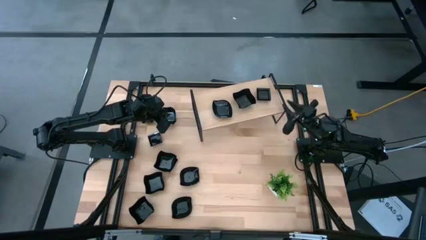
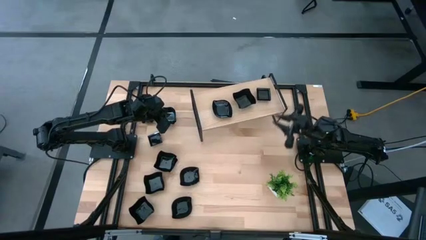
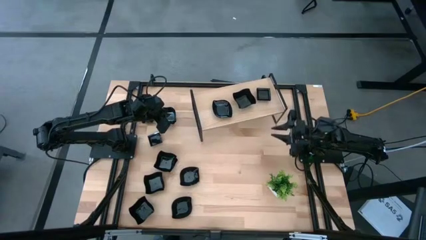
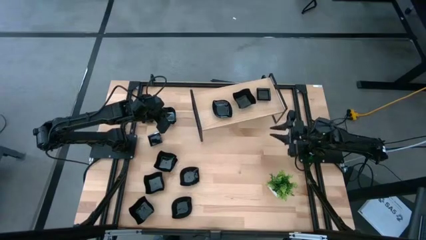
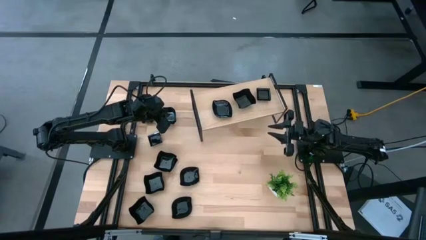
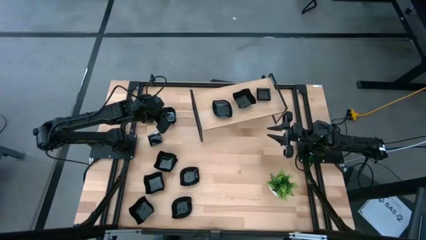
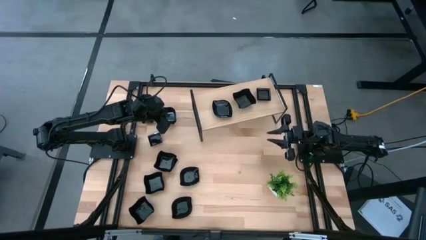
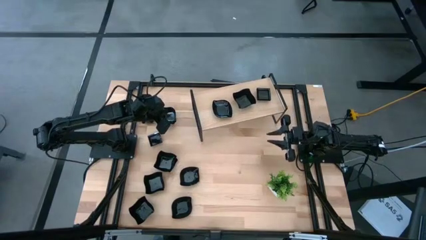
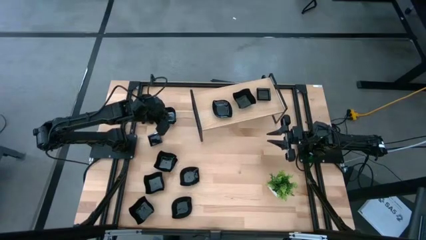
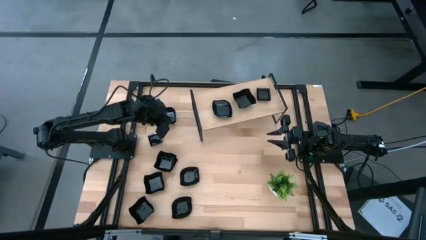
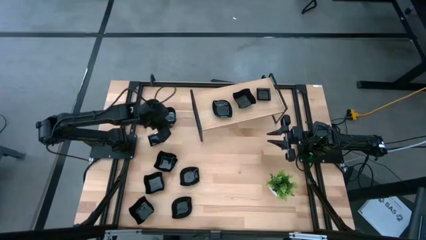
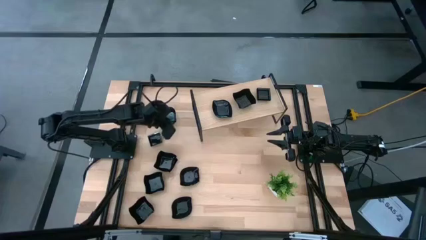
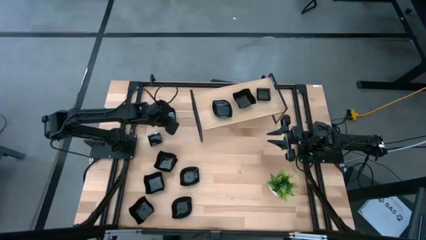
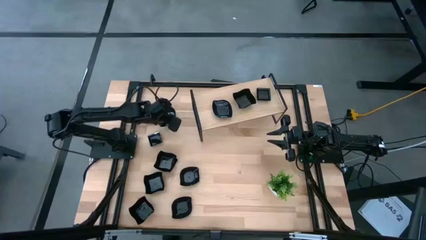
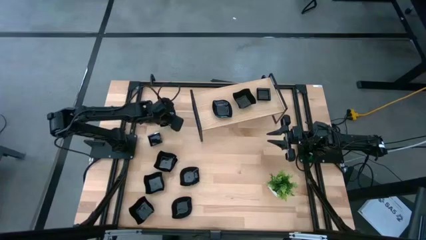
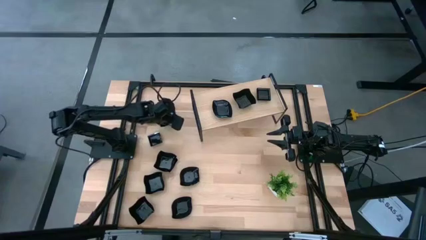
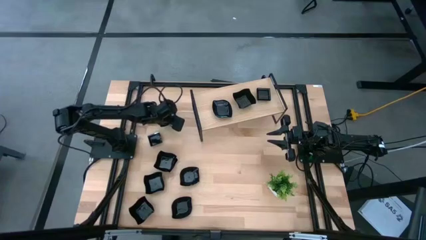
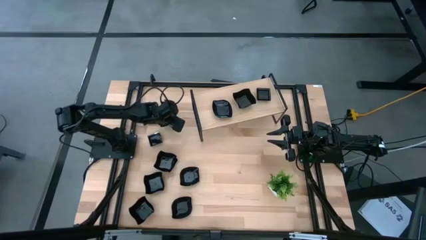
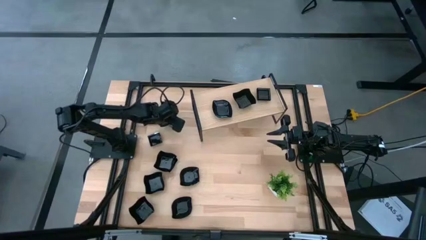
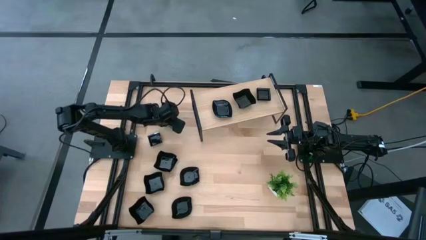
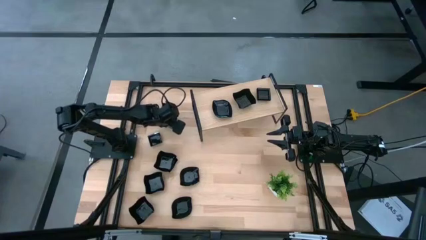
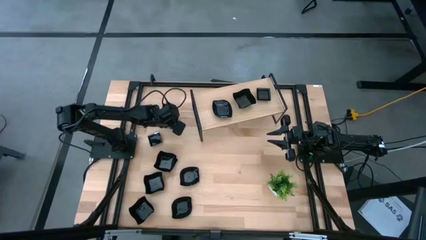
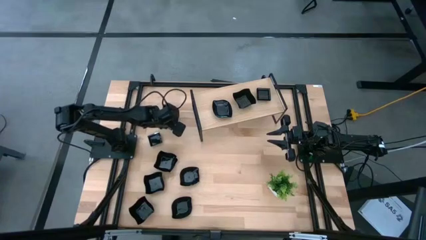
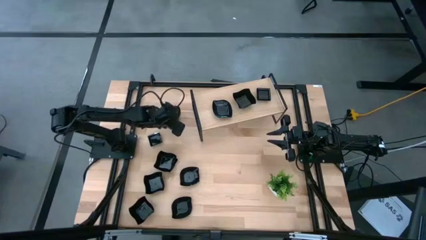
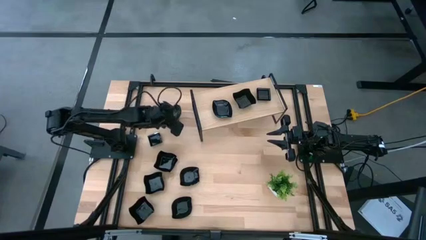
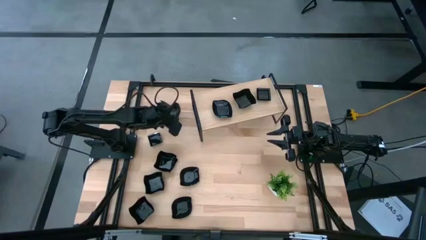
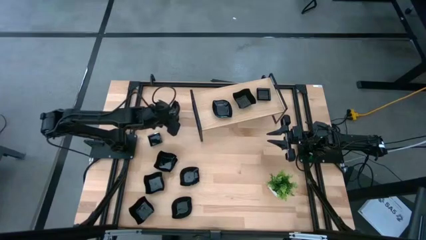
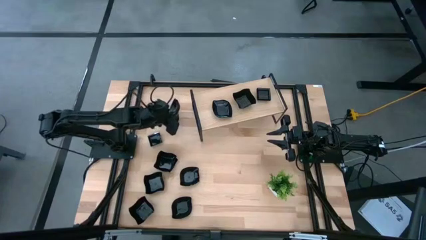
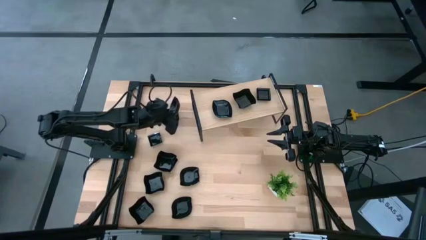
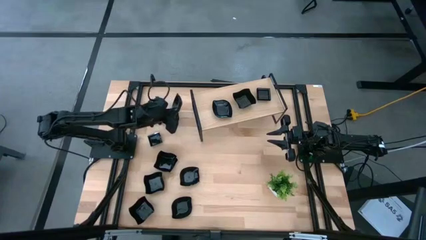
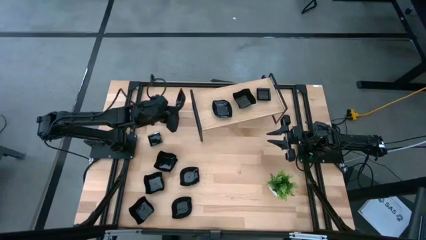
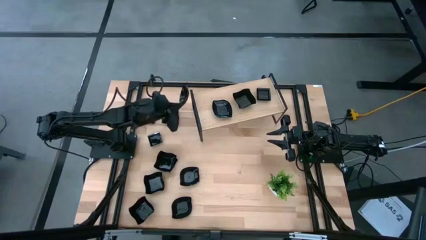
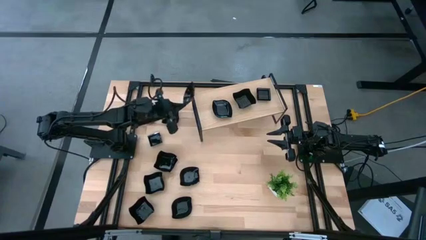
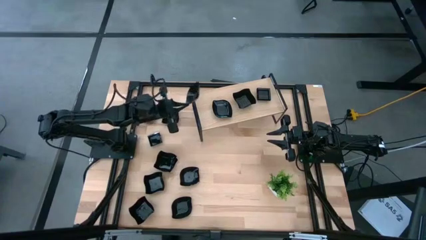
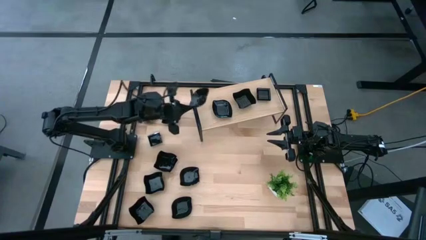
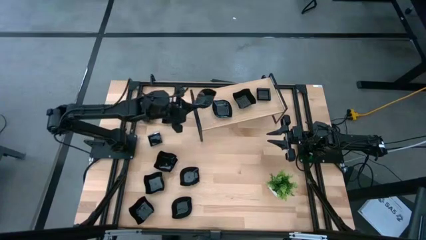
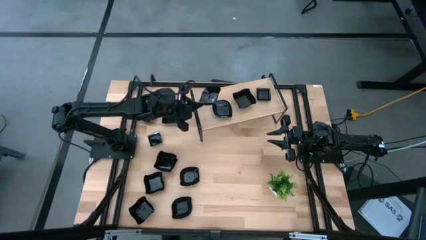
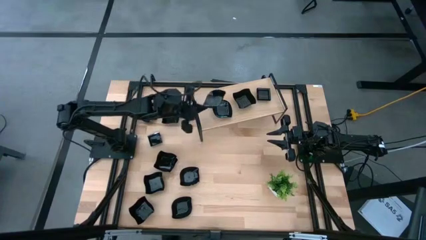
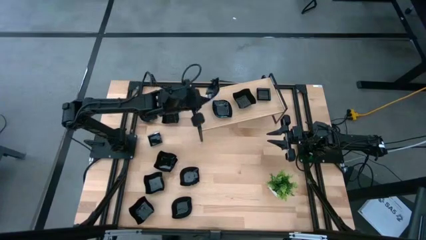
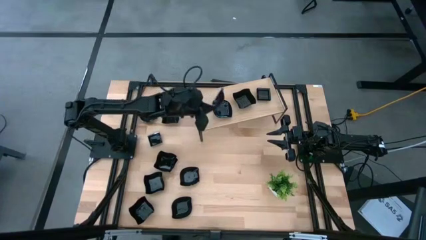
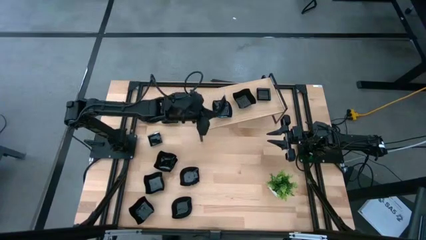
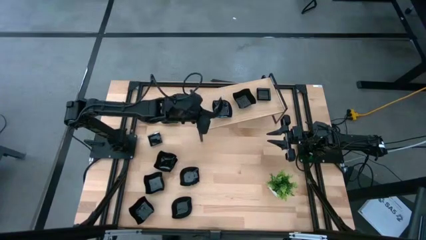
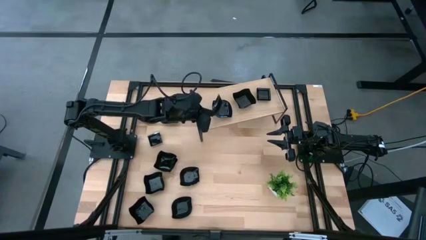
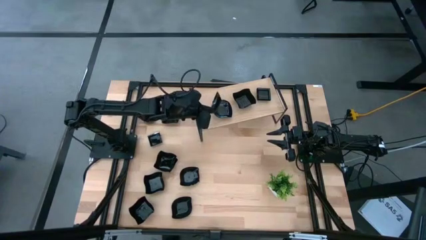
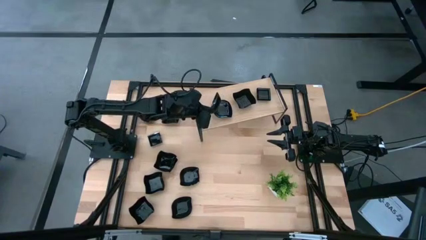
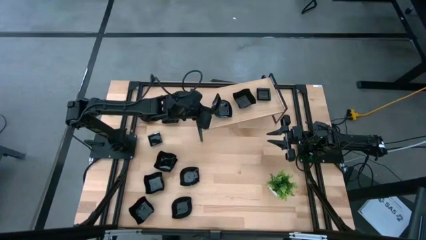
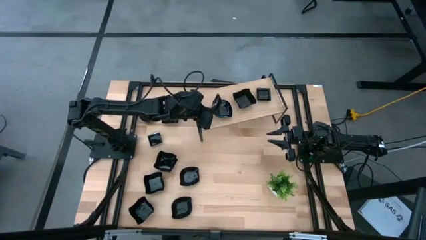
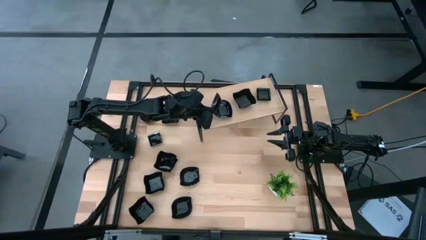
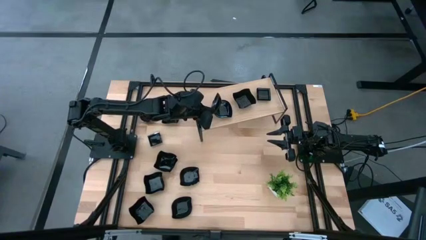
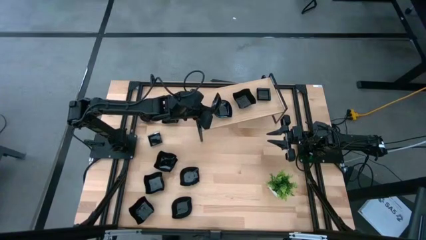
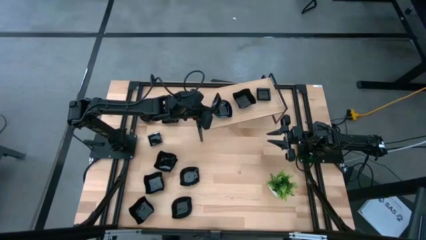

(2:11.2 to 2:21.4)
Task: Pick & Place Mini shaped plates
Stack the leaf-shaped plate on top of the leaf-shaped plate on the shelf

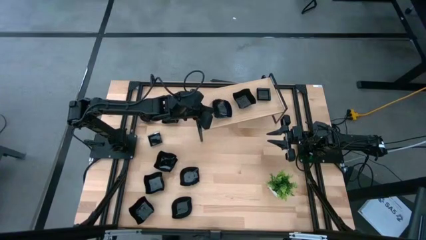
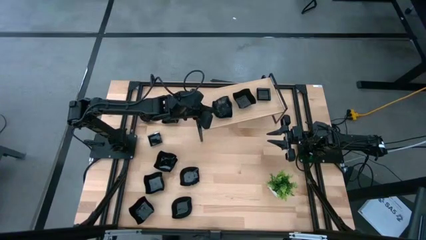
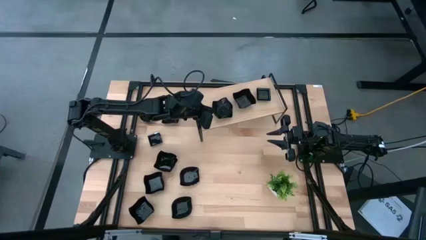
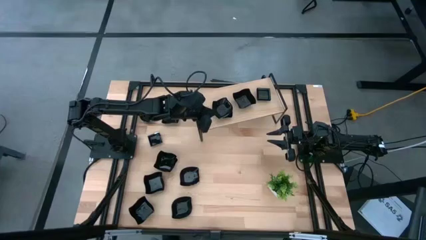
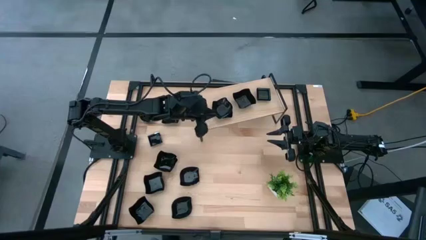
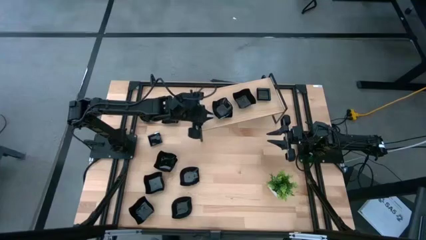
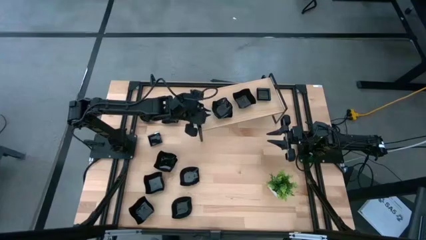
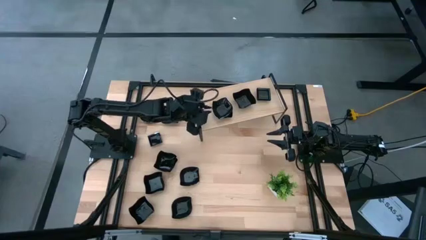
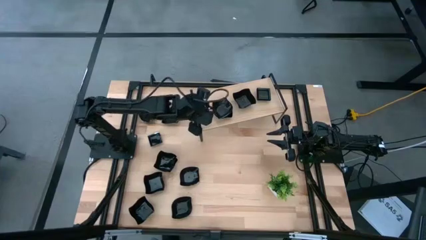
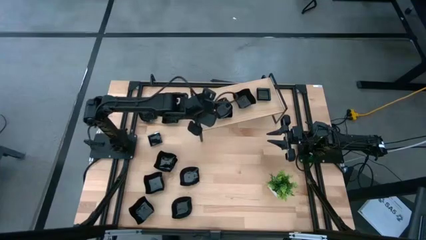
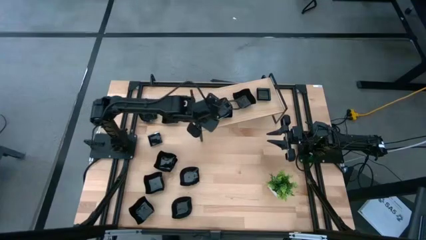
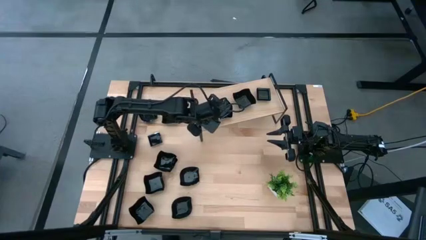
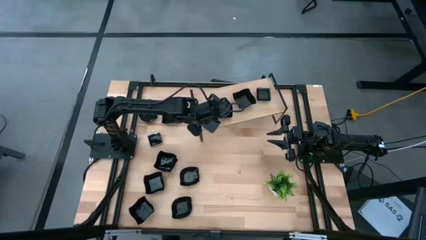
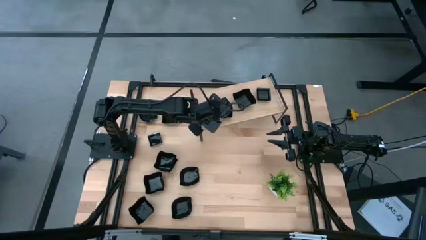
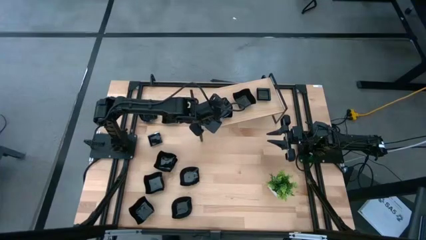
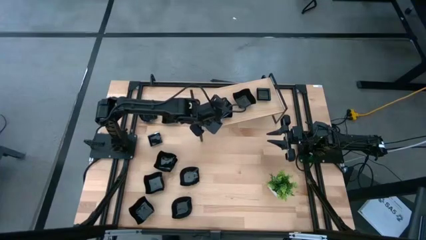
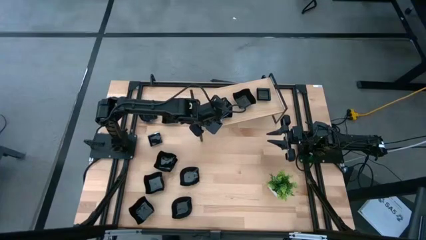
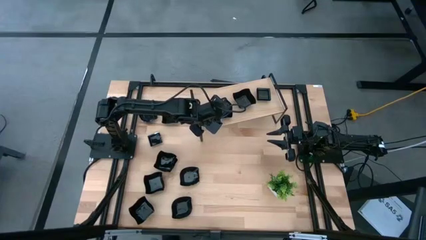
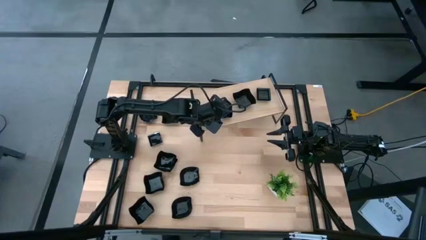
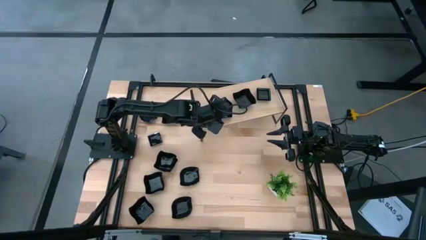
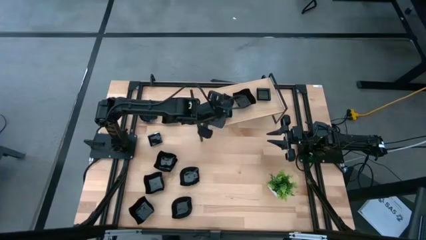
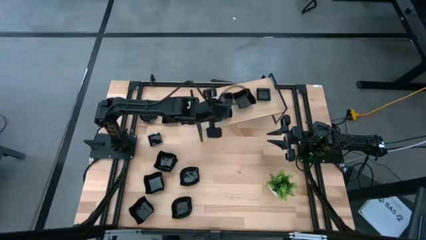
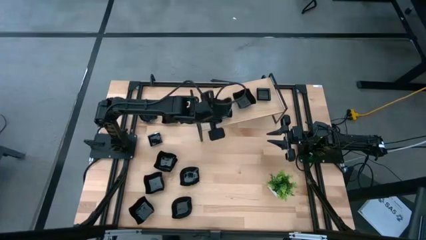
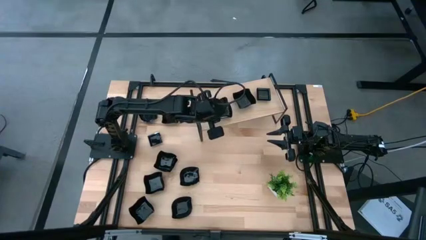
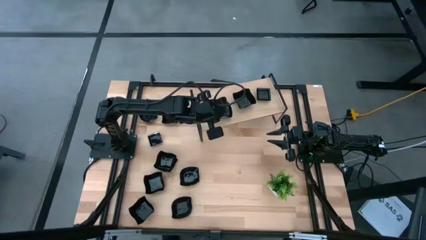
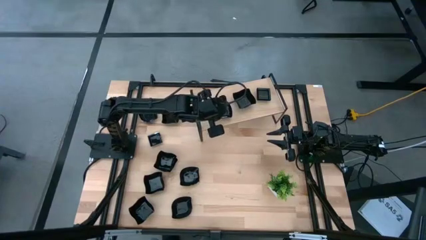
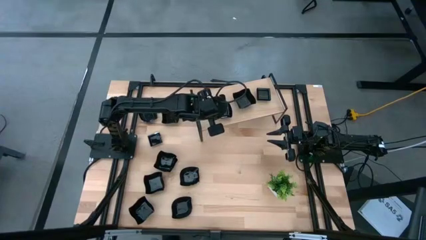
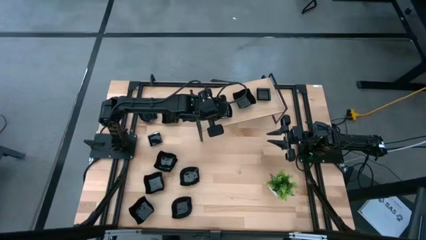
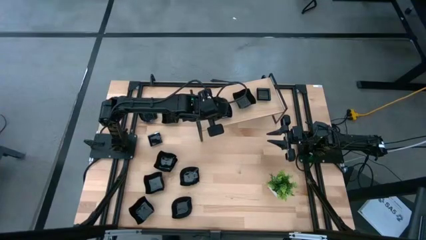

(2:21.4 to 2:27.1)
Stack the leaf-shaped plate on top of the leaf-shaped plate on the shelf
